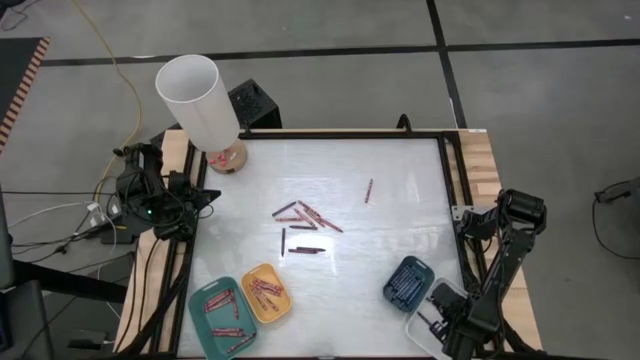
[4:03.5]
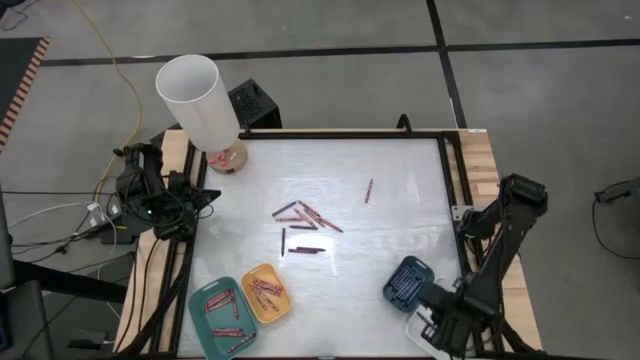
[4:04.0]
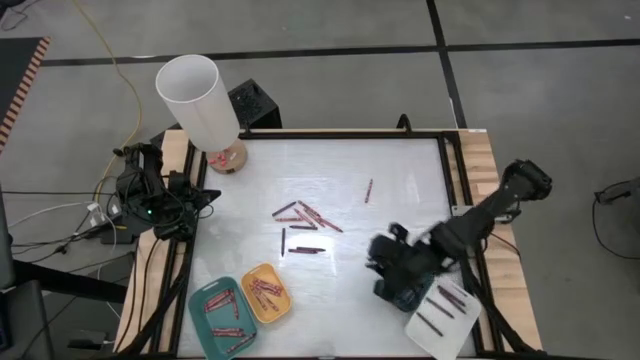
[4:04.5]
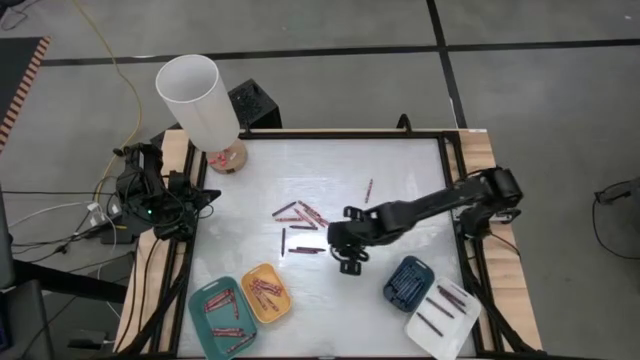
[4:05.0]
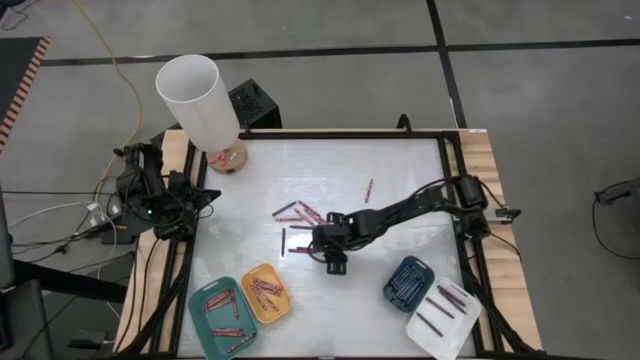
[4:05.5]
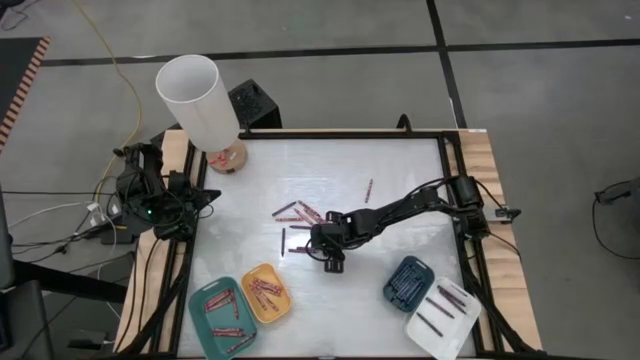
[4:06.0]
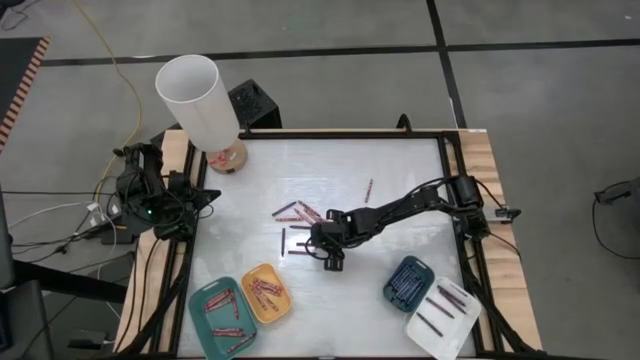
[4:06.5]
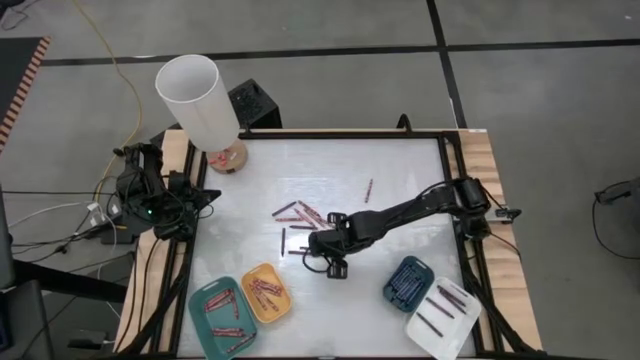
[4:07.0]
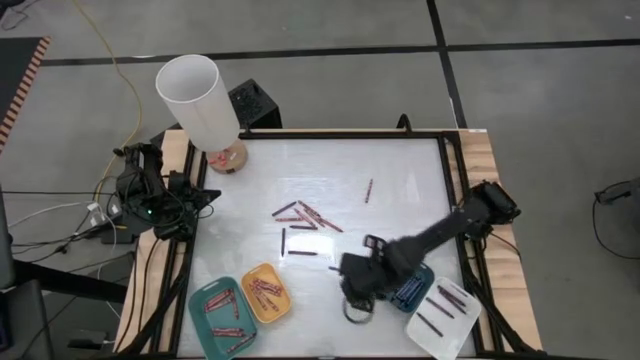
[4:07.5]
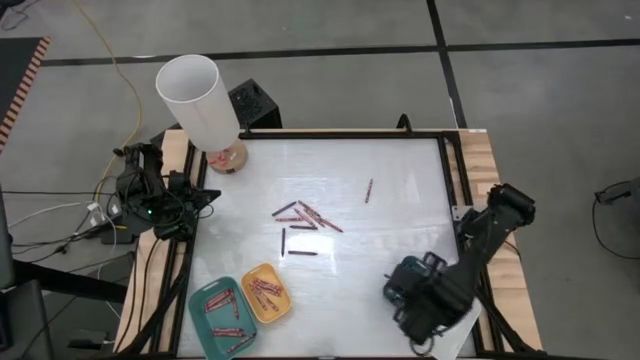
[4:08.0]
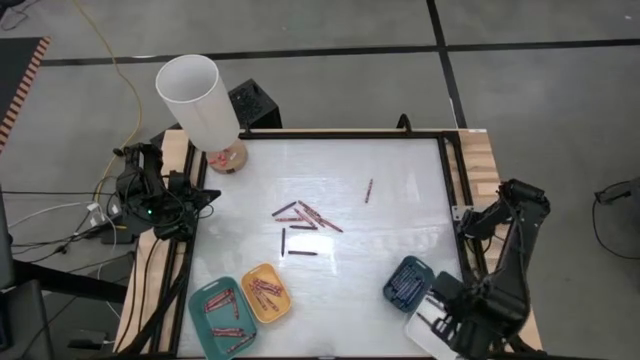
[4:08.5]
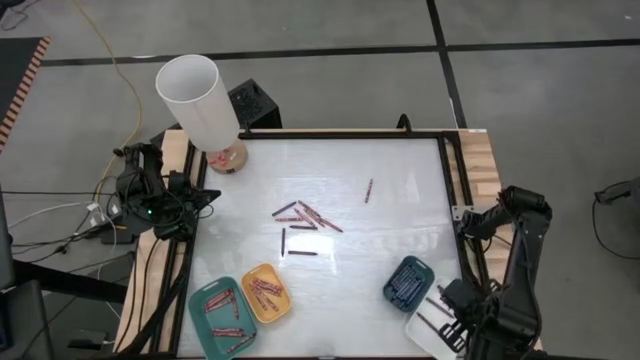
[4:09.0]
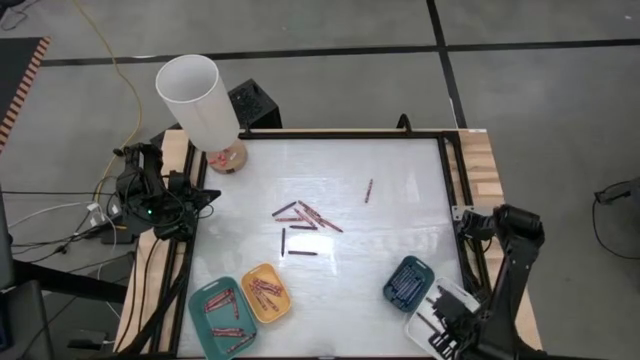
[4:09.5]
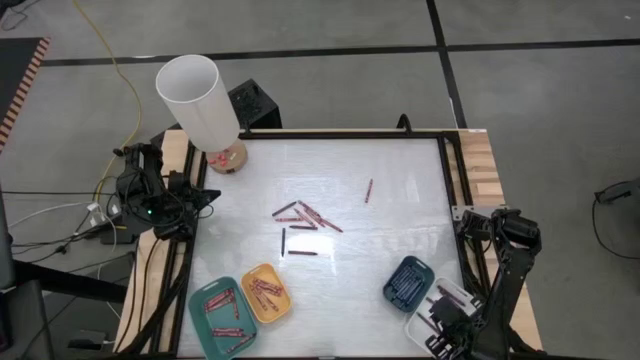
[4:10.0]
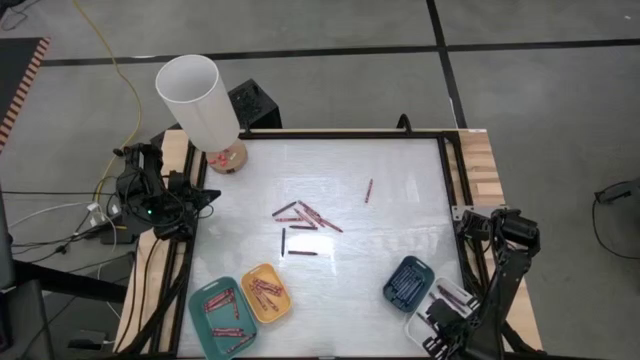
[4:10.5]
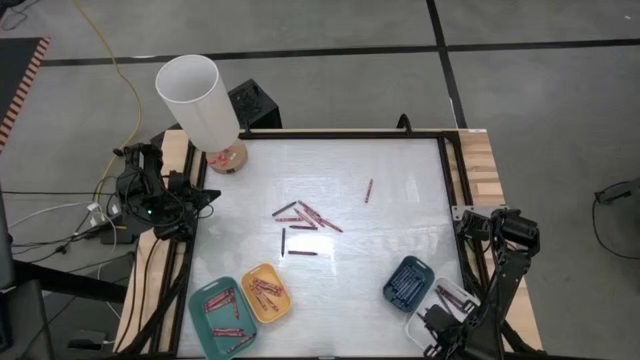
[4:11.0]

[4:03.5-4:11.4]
Task: Sort crayons
Put the purple crayon into the white bin

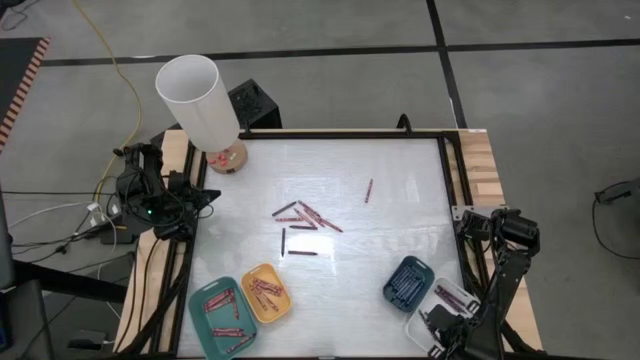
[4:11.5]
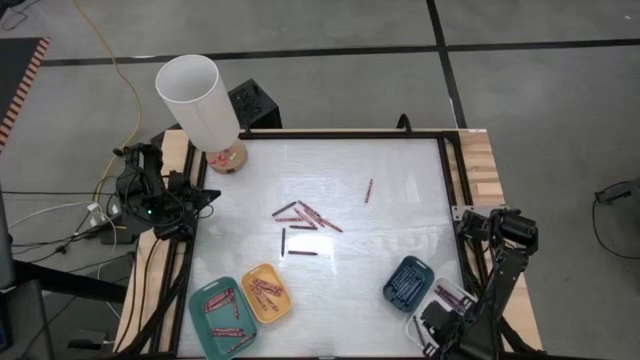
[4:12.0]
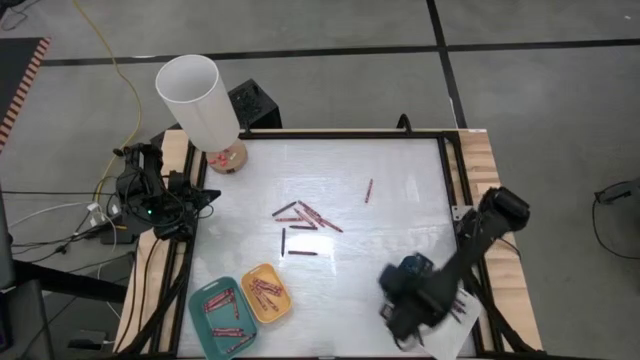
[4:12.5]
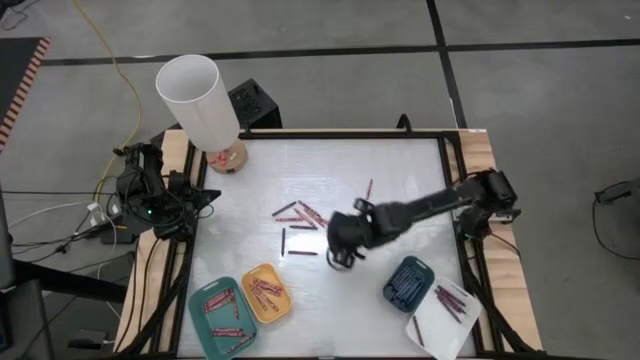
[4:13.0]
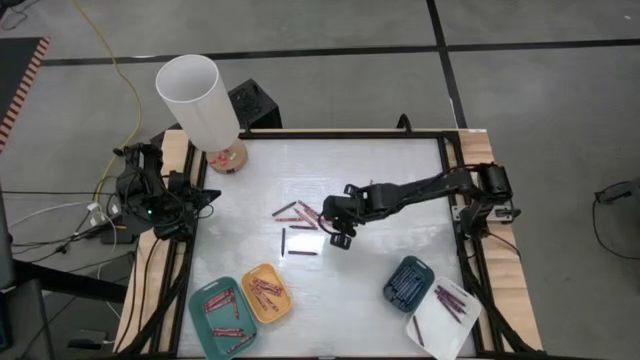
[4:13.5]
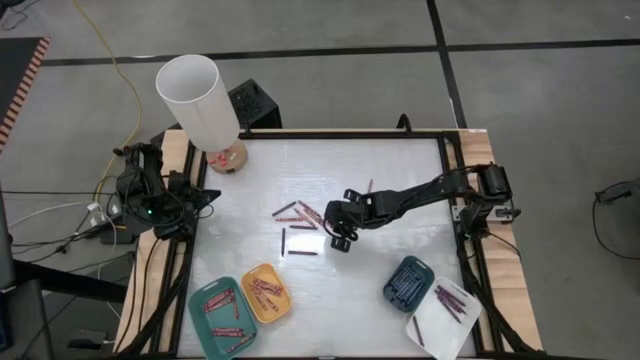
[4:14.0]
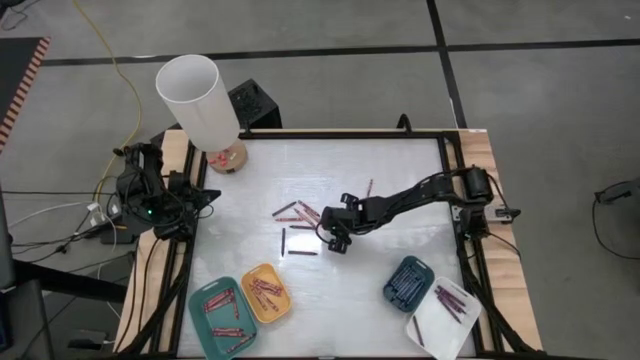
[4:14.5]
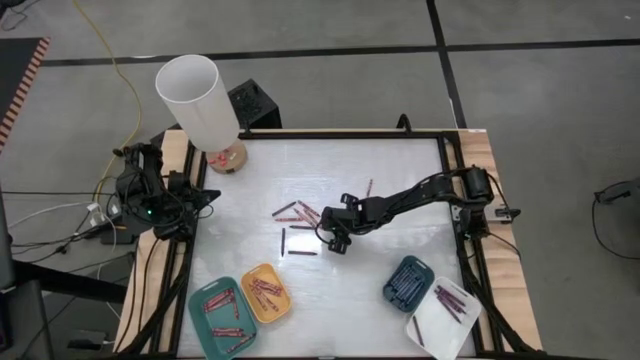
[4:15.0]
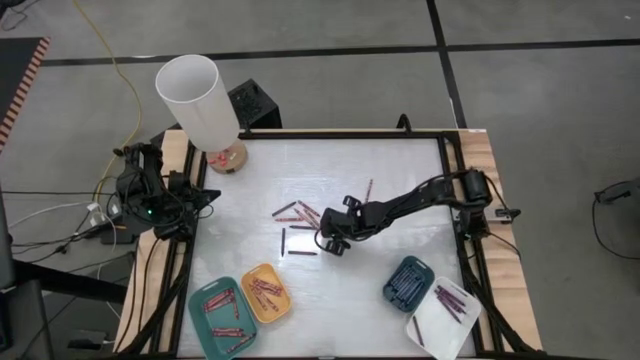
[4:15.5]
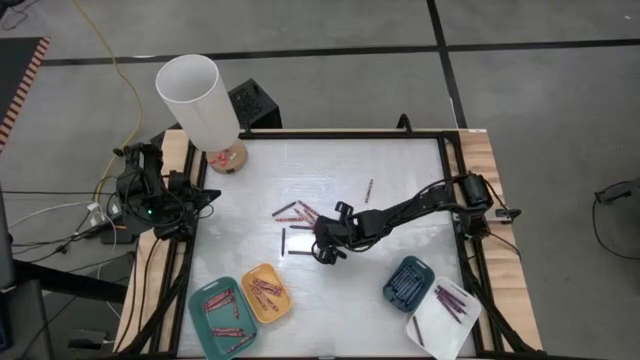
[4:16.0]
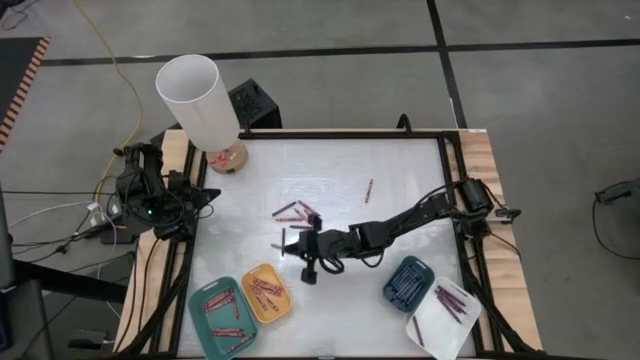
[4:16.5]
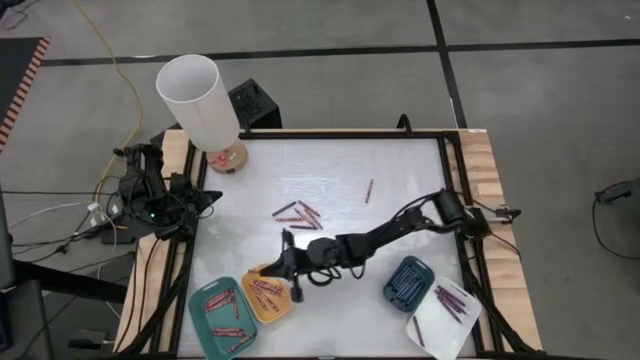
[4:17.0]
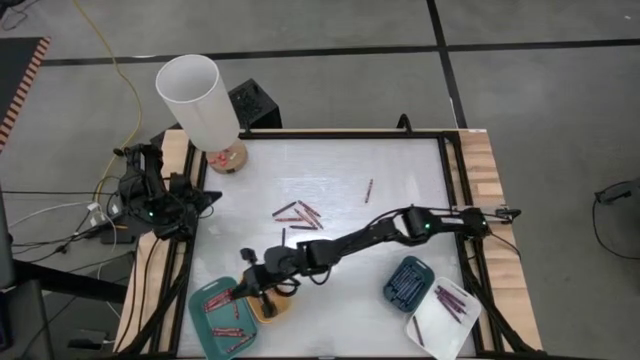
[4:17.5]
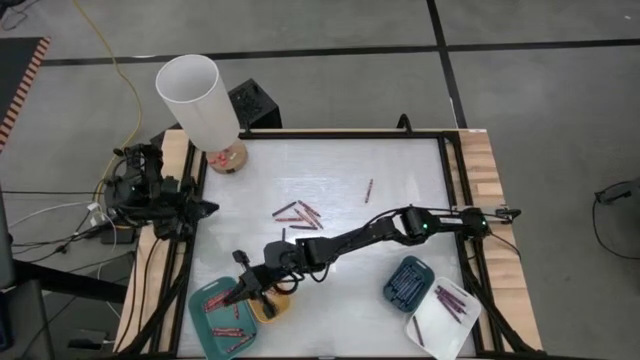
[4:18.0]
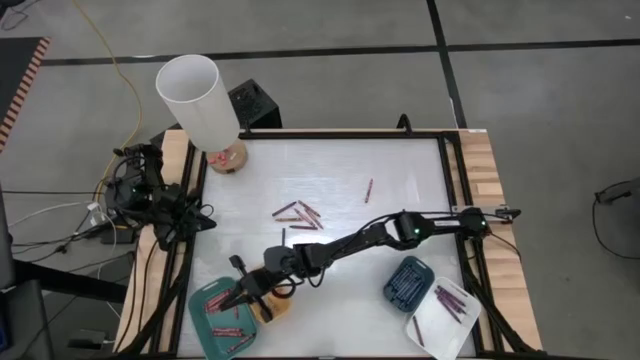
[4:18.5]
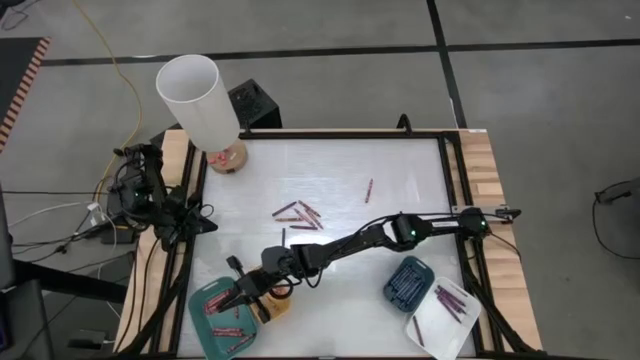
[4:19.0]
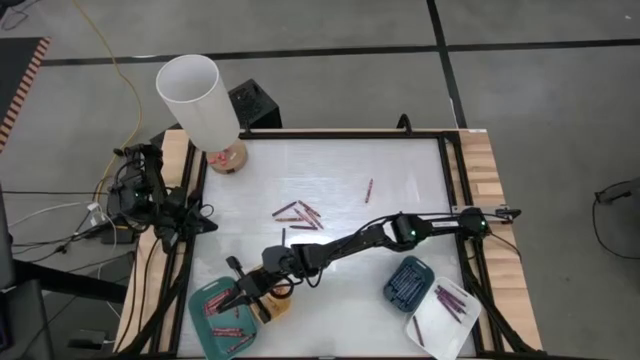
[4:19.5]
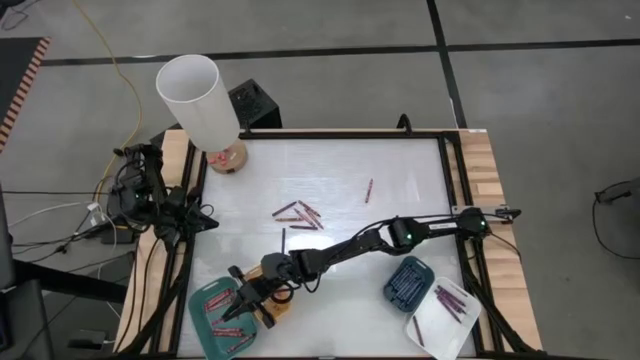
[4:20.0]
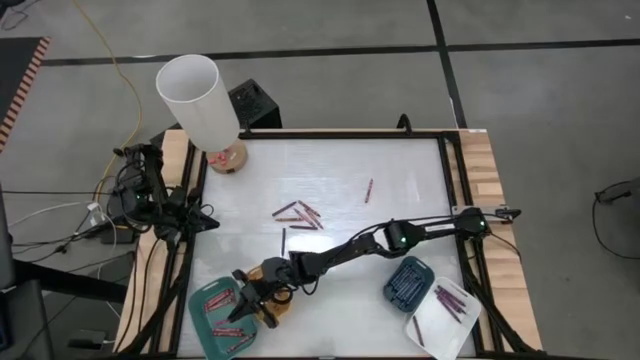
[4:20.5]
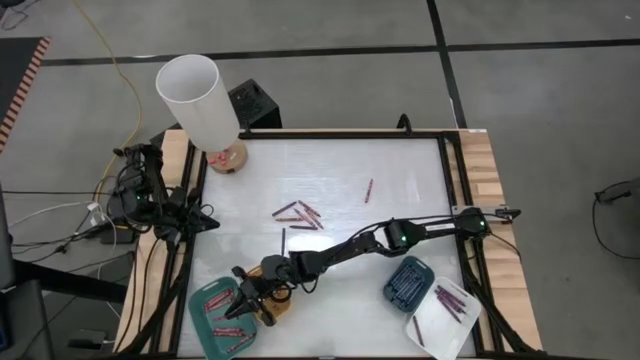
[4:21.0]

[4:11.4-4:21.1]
Put the red crayon into the blue bin

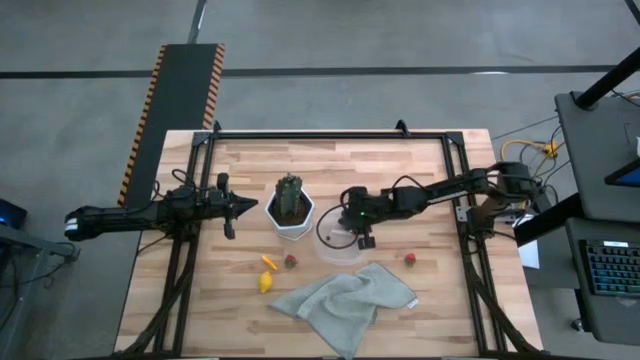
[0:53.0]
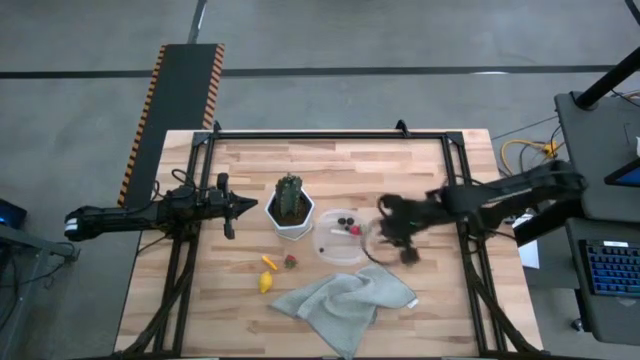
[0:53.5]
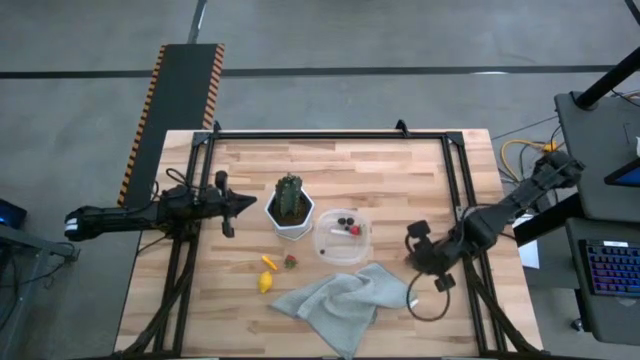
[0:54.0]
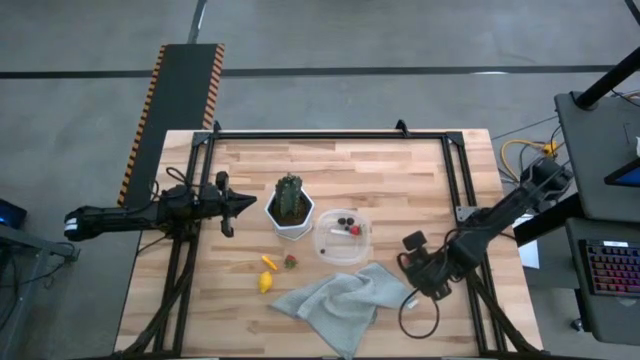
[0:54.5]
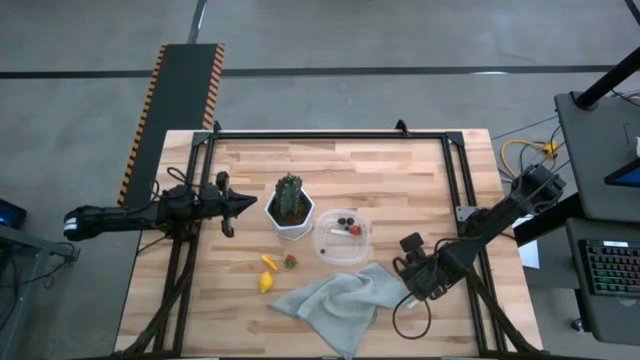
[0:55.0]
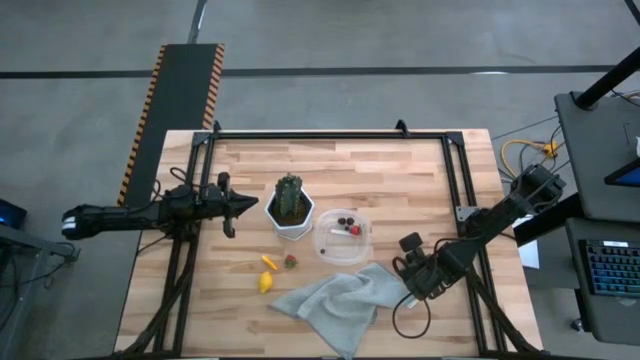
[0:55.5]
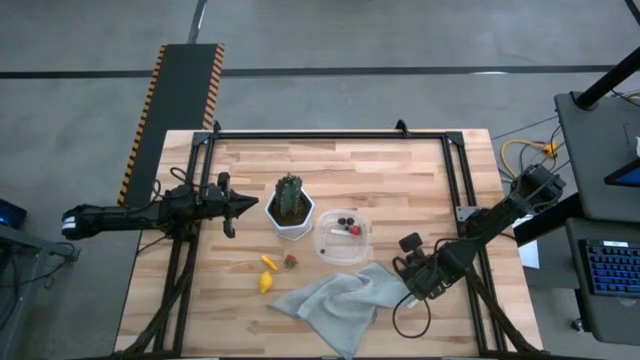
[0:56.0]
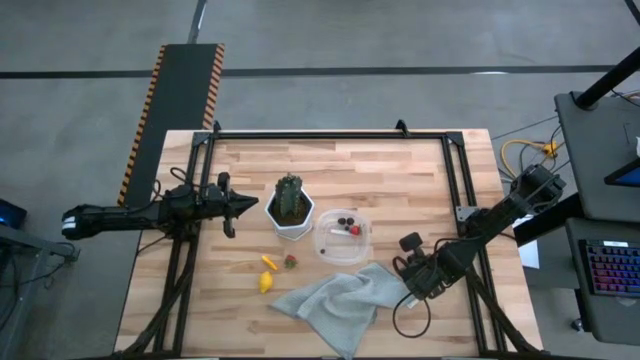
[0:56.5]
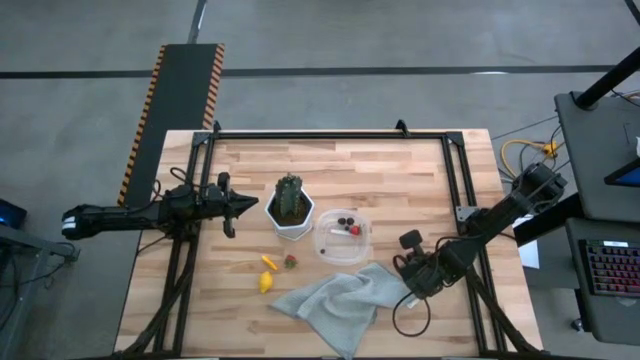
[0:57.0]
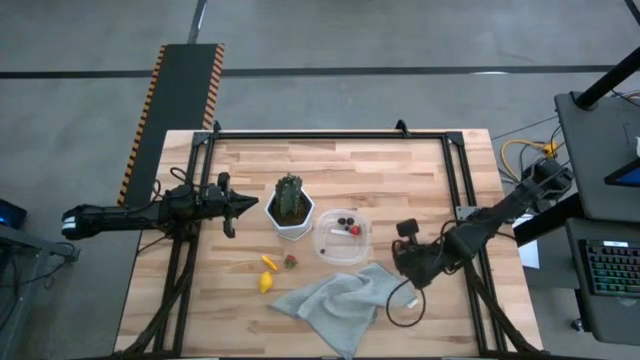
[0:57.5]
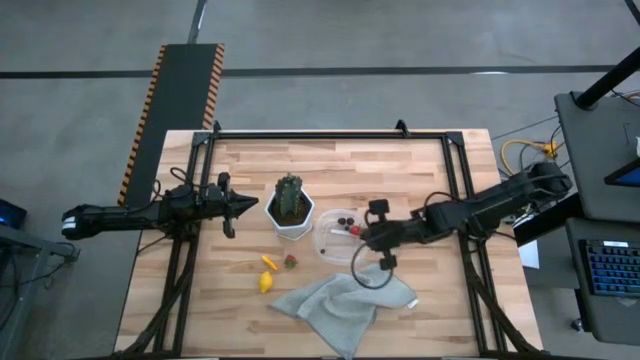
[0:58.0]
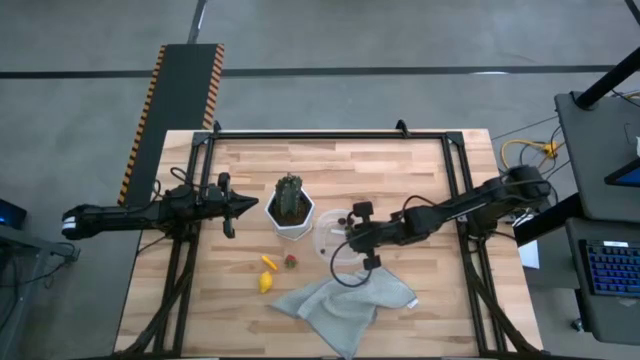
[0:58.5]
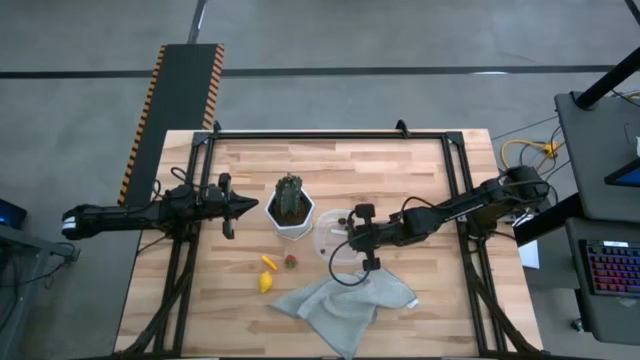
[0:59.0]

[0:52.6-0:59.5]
Task: Pick and placing Produce into tupperware
Put the right strawberry into the transparent bin
